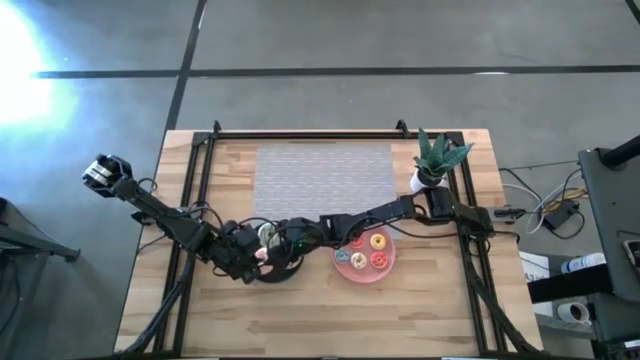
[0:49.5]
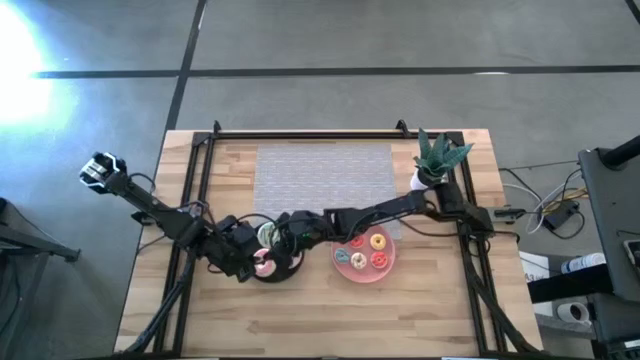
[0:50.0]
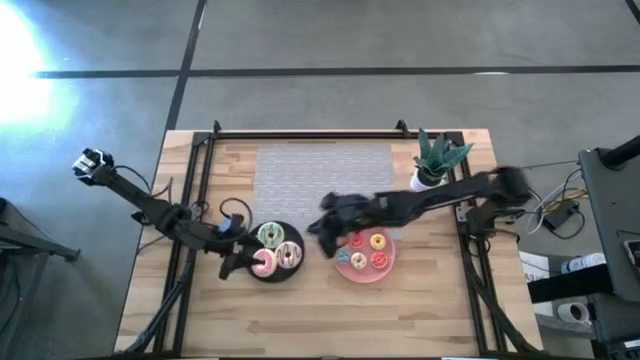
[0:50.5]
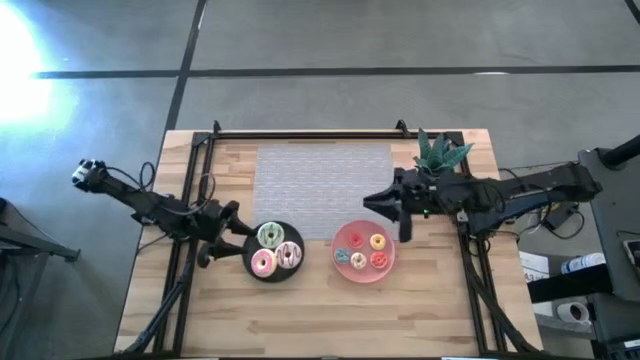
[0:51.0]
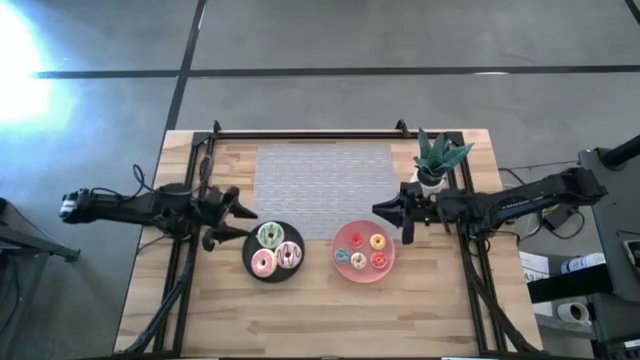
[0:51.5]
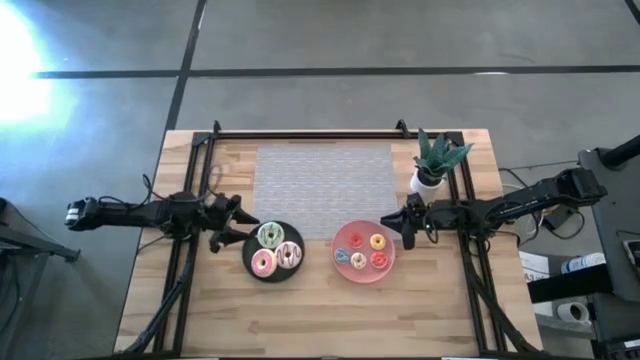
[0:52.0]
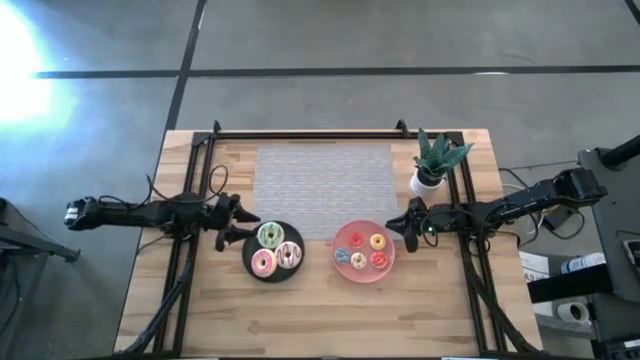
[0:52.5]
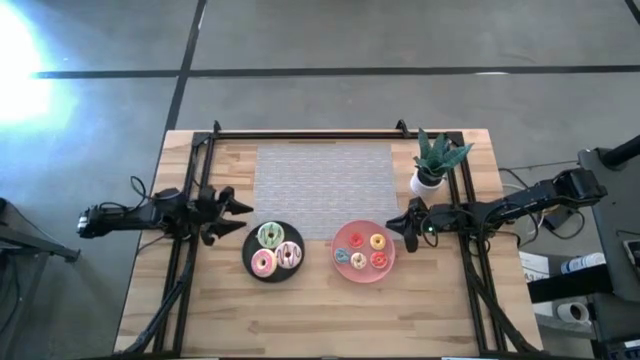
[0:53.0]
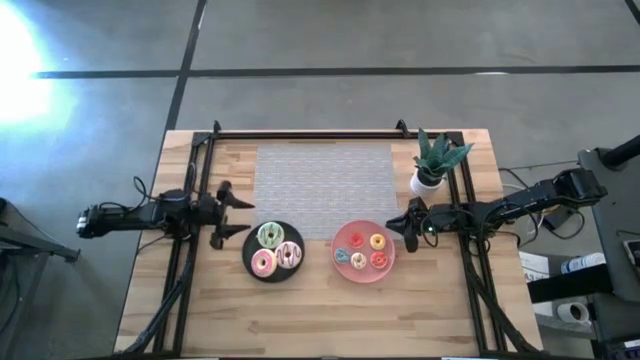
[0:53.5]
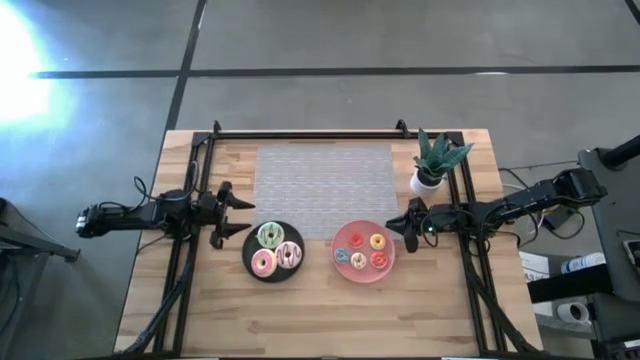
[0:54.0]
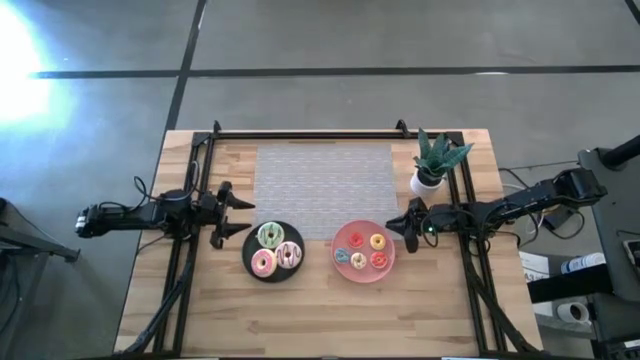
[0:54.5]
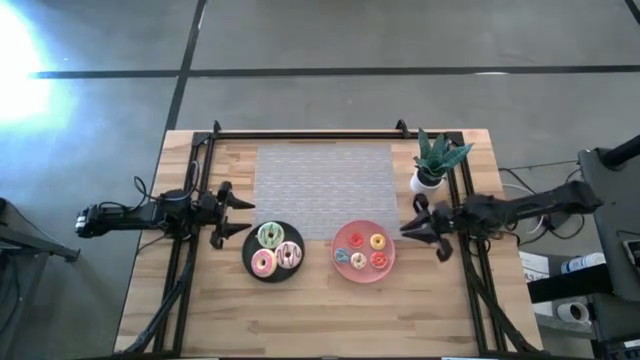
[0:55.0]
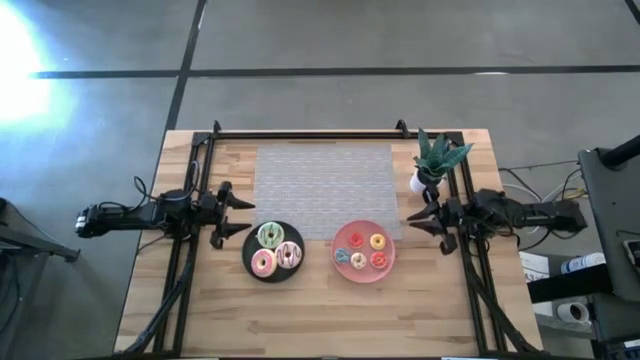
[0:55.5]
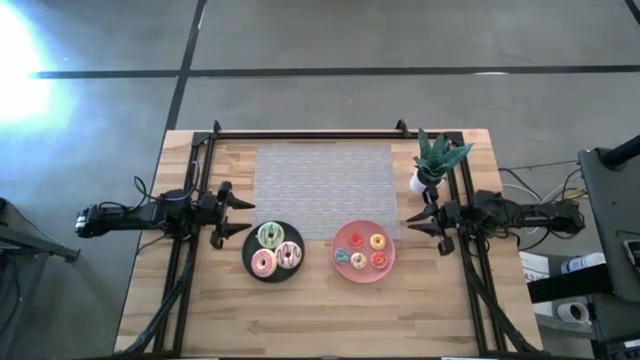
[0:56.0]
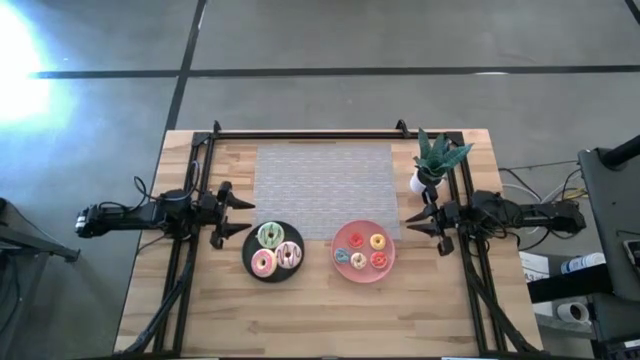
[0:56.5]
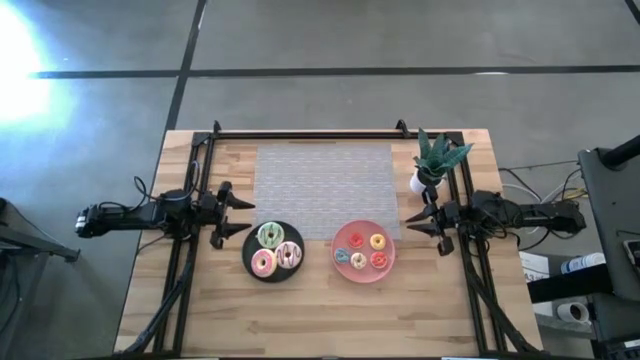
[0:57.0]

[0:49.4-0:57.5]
Task: Pick & Place donuts
Return to Home Position

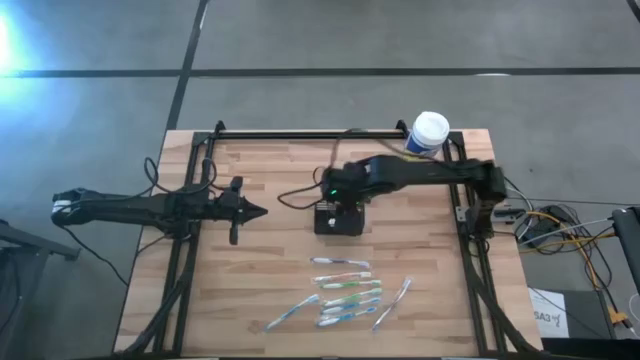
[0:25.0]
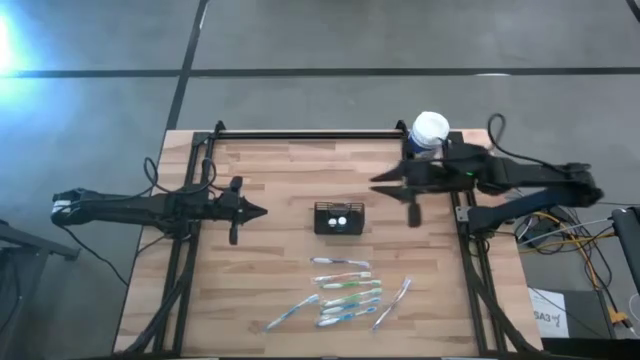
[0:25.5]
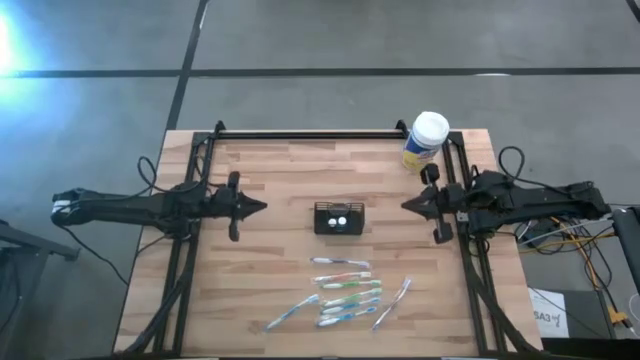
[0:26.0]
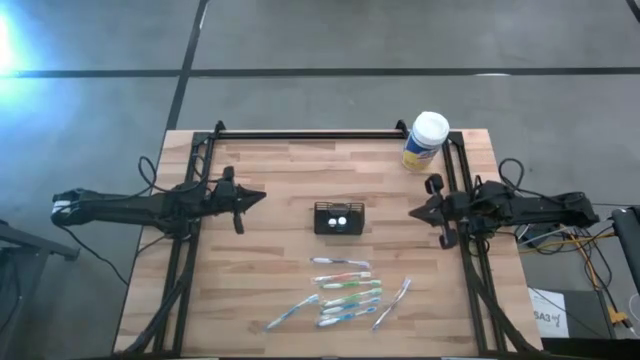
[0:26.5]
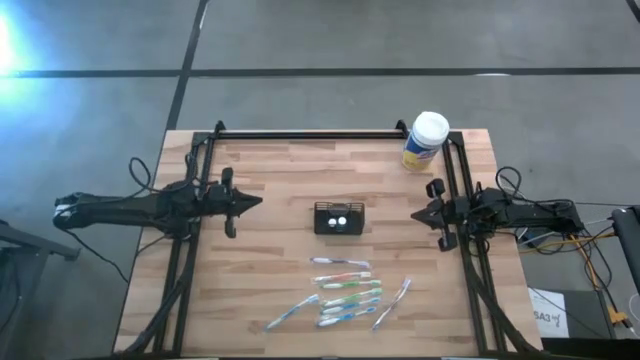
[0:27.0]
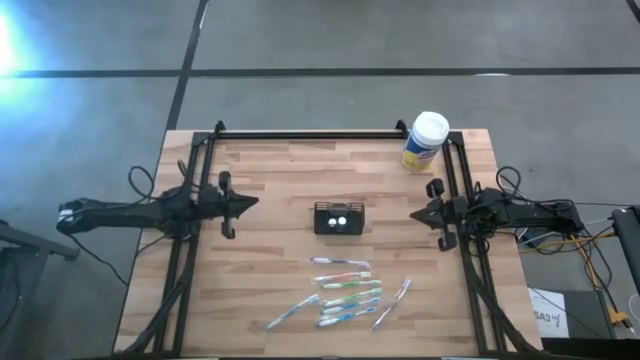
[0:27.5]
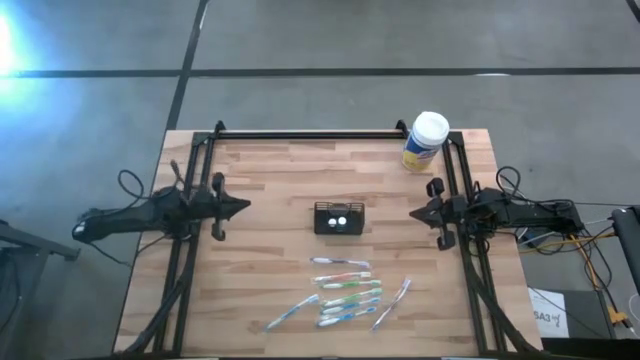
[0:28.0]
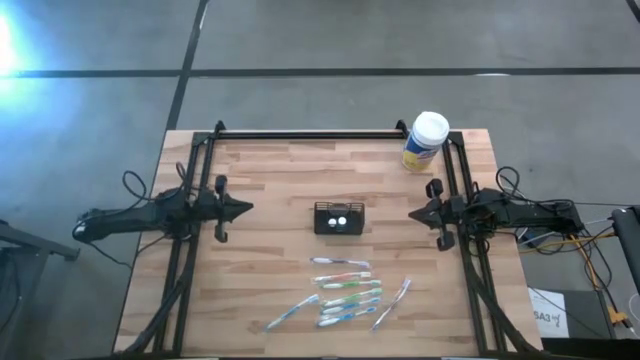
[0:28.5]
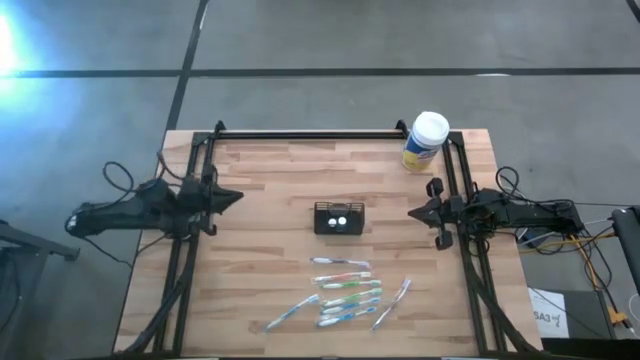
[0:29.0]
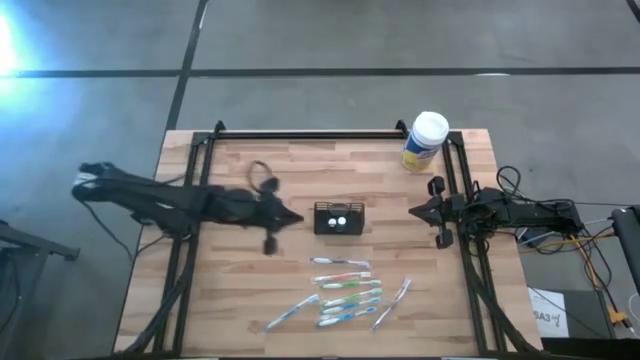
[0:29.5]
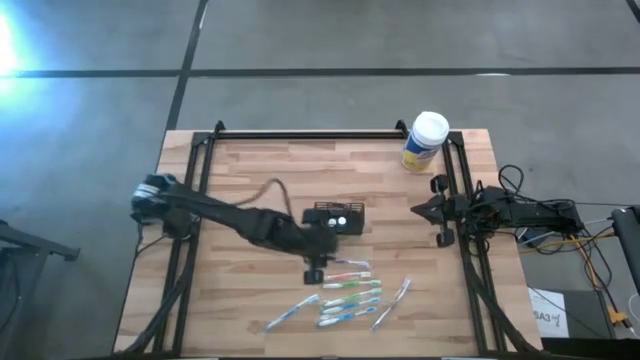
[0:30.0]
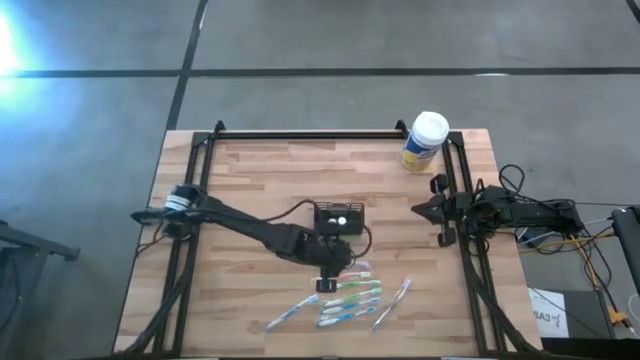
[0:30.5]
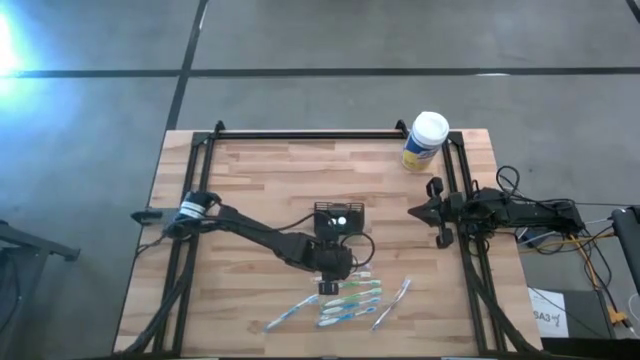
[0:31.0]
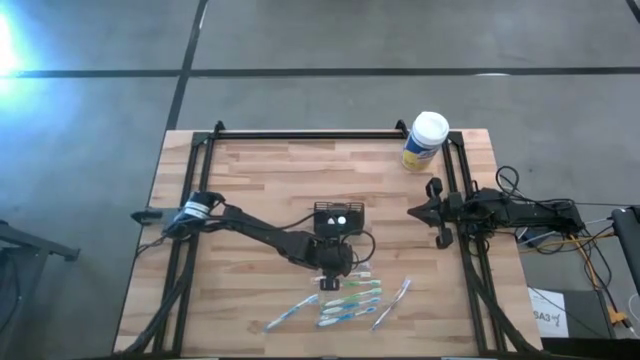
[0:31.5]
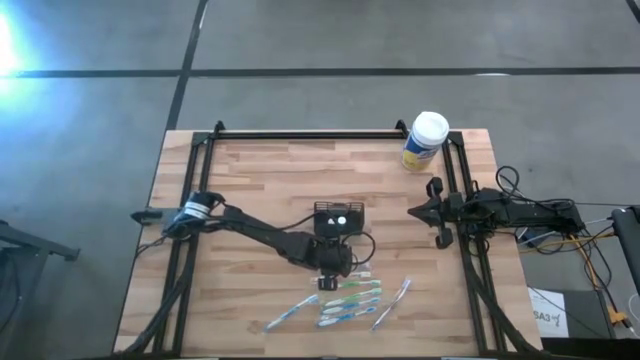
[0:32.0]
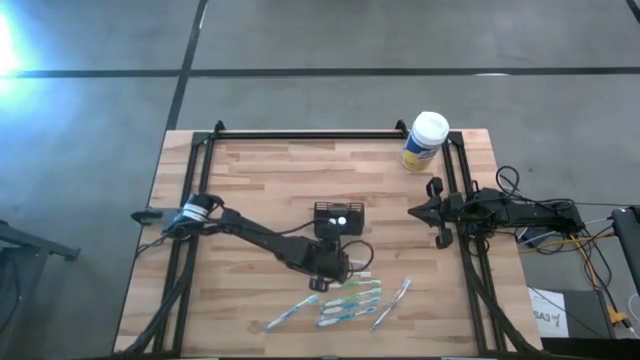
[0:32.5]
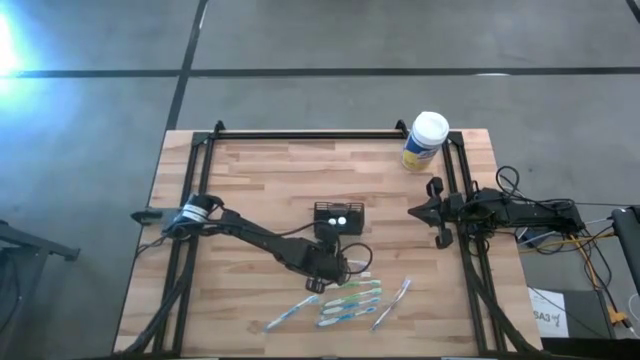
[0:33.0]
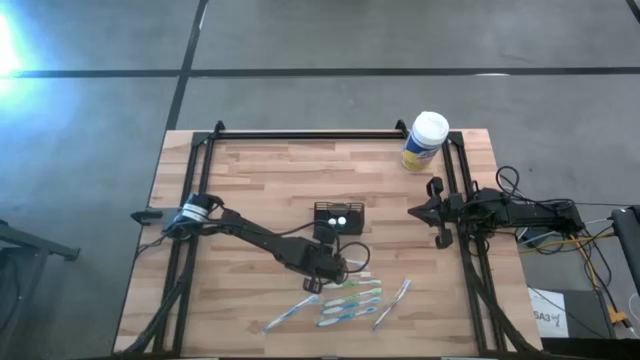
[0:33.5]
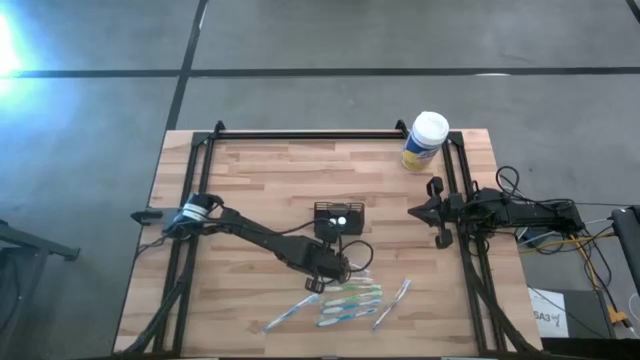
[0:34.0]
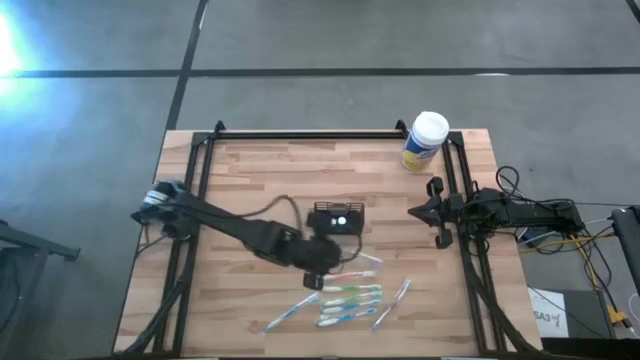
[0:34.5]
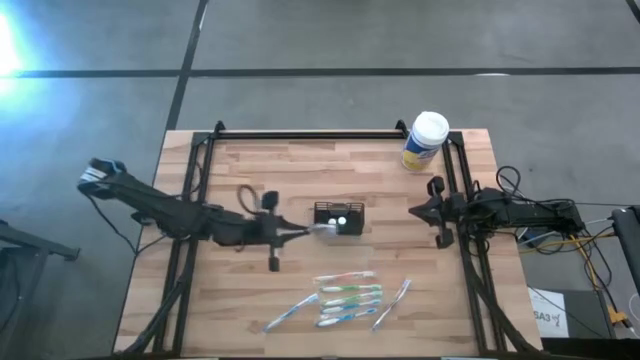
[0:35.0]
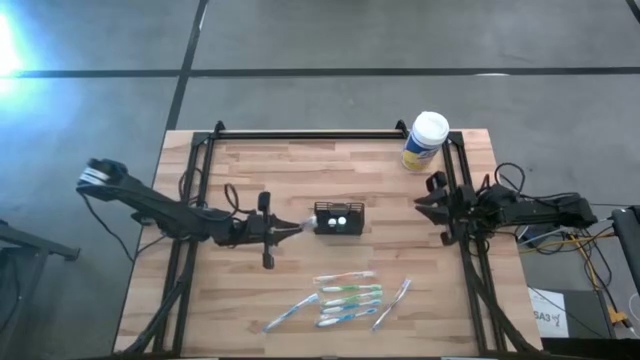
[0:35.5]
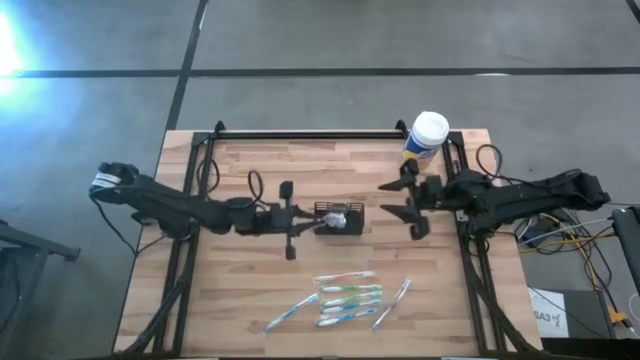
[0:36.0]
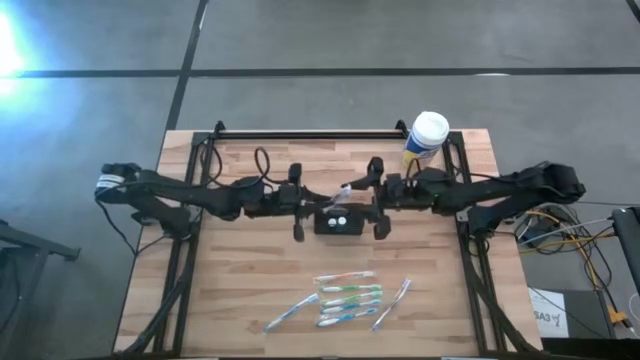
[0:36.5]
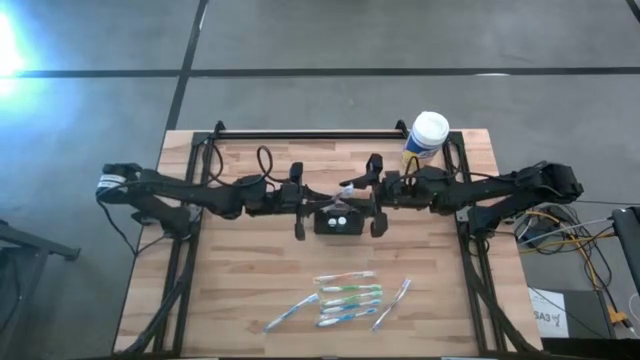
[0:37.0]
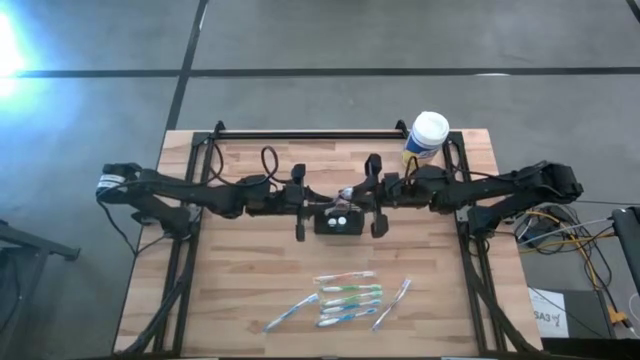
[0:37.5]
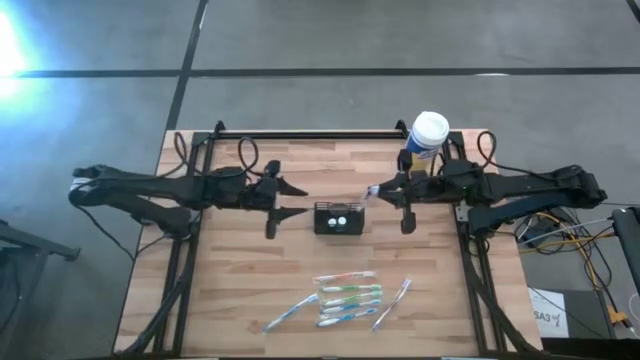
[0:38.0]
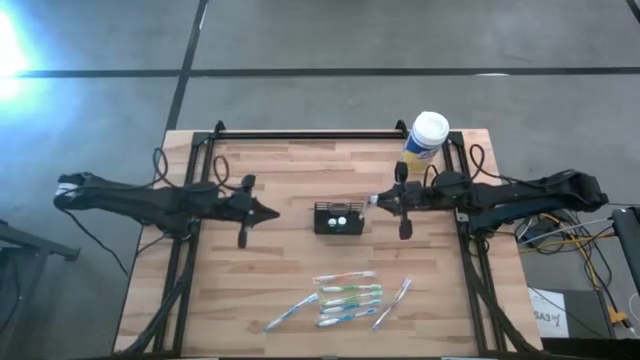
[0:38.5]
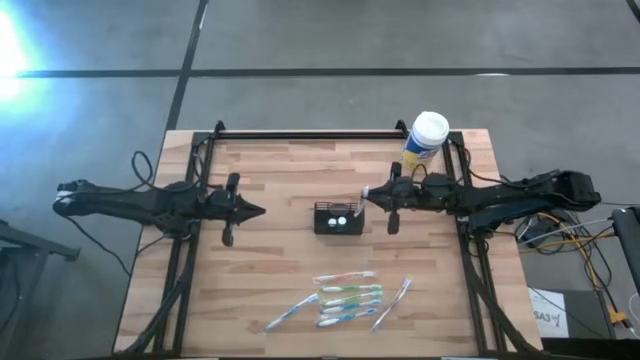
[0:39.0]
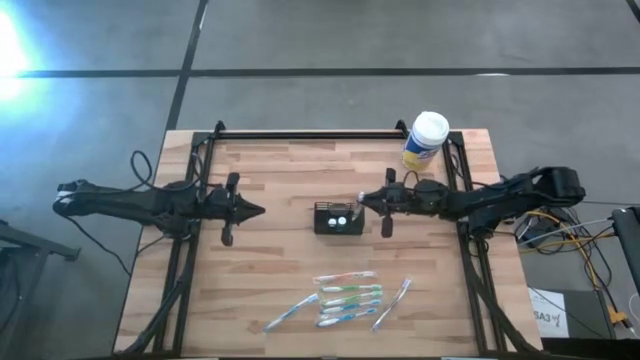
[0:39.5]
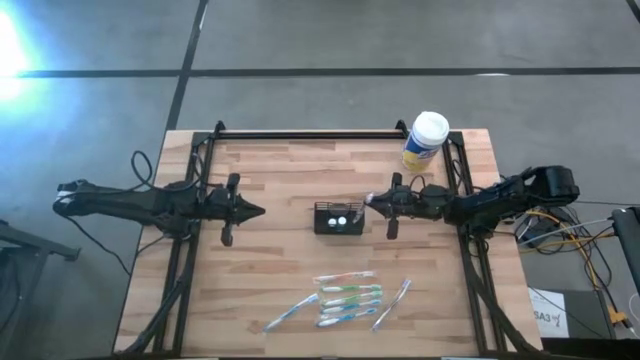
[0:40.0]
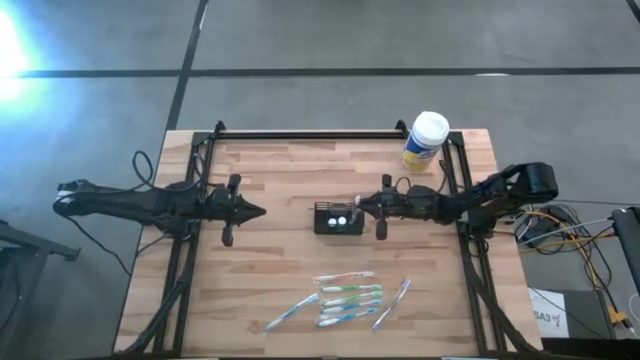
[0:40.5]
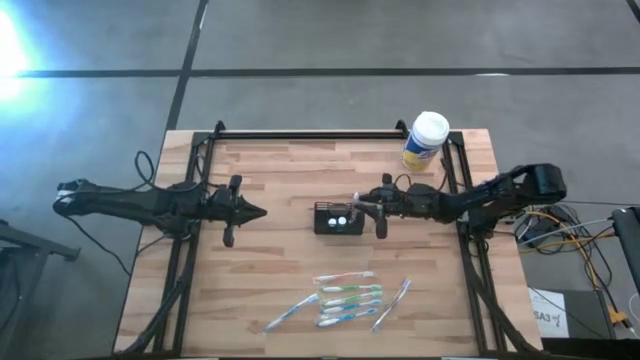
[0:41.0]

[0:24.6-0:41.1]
Task: Pick & Place toothbrushing station
Put the top purple toothbrush into the wire organizer
